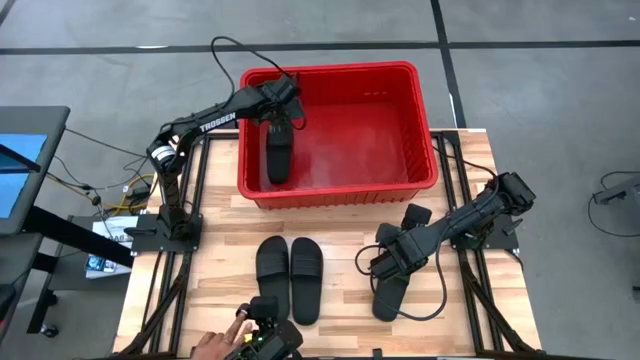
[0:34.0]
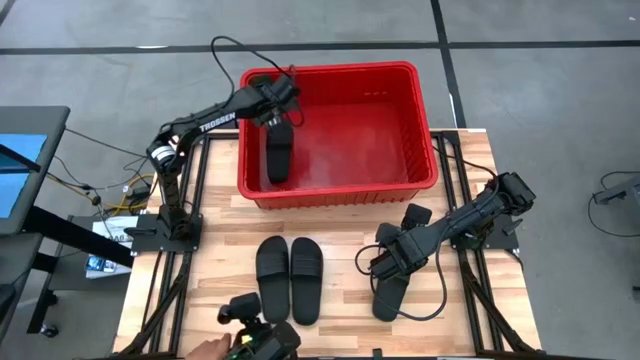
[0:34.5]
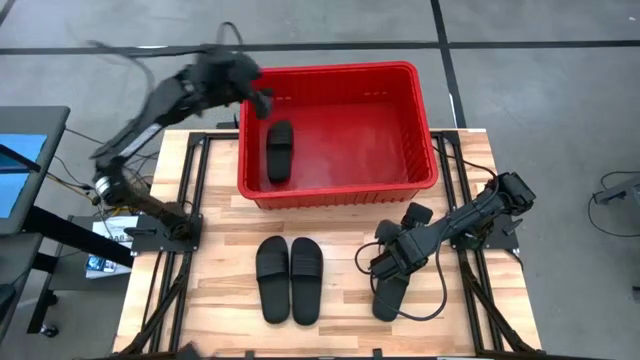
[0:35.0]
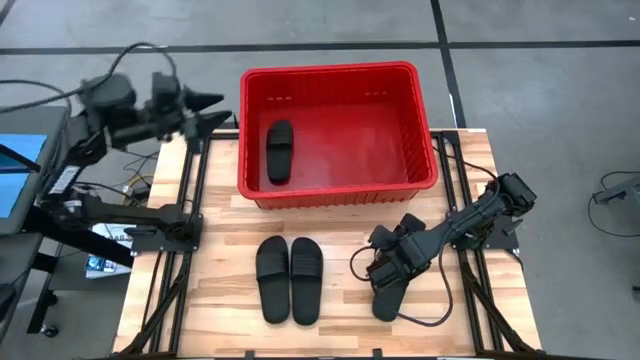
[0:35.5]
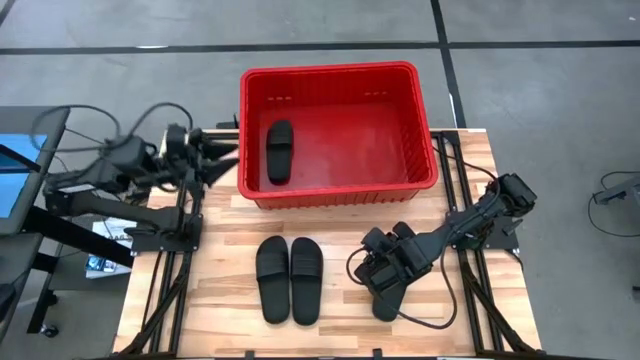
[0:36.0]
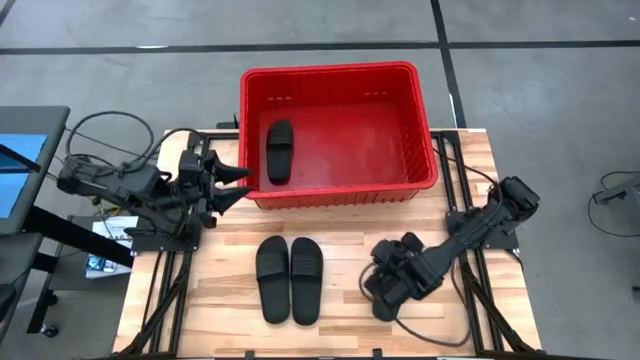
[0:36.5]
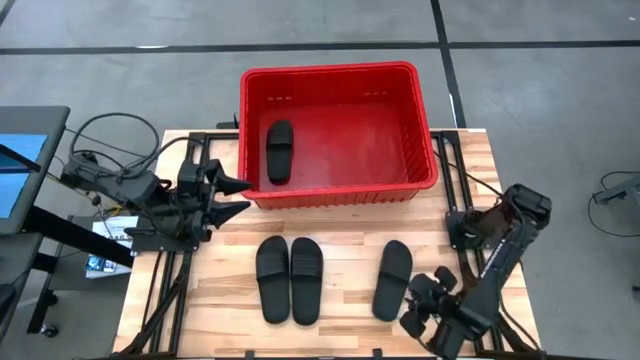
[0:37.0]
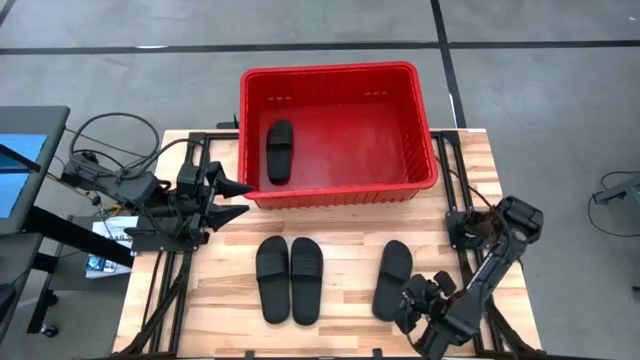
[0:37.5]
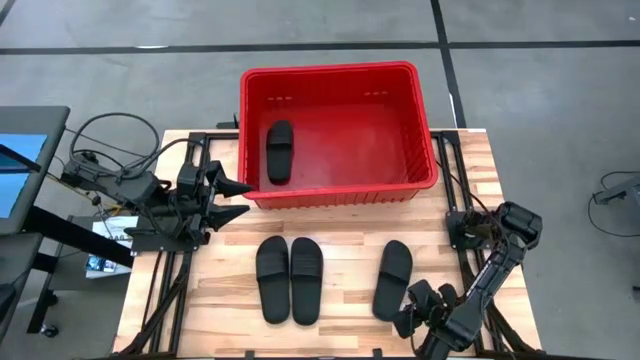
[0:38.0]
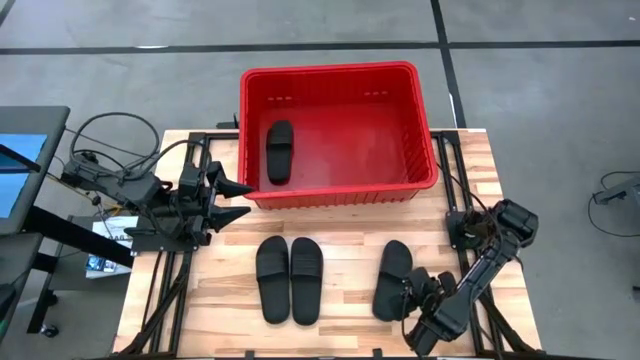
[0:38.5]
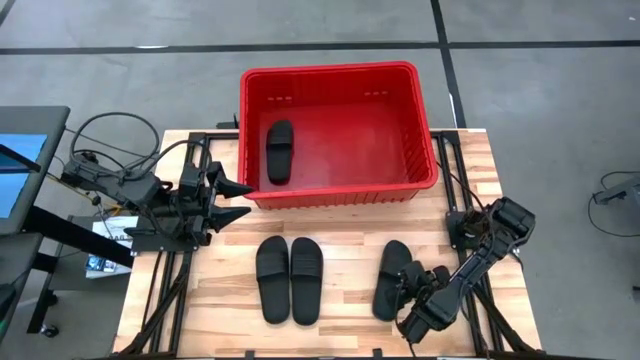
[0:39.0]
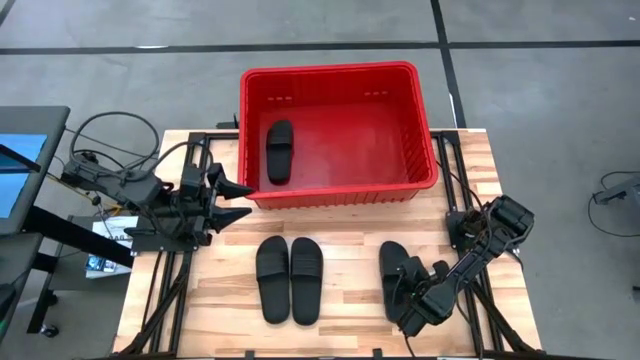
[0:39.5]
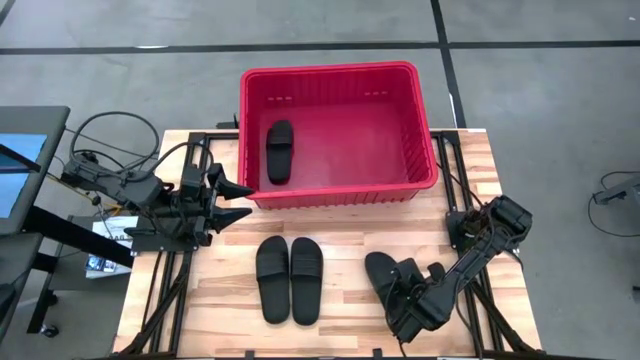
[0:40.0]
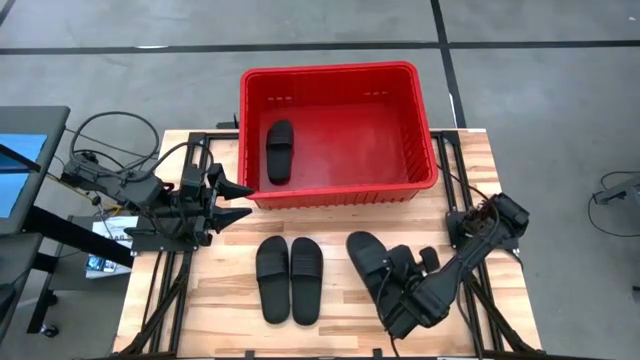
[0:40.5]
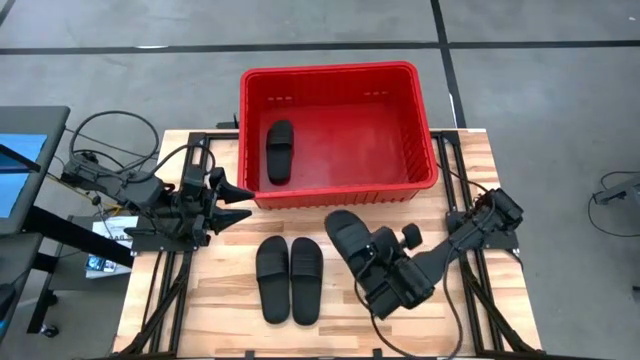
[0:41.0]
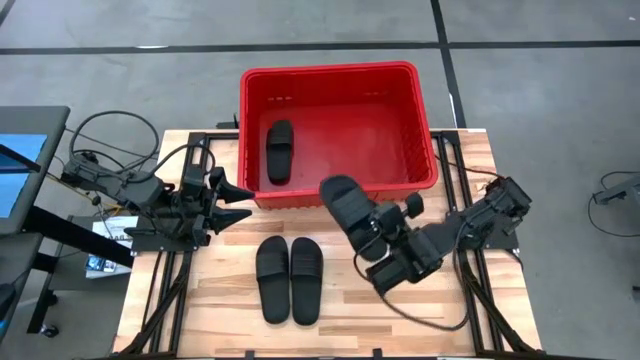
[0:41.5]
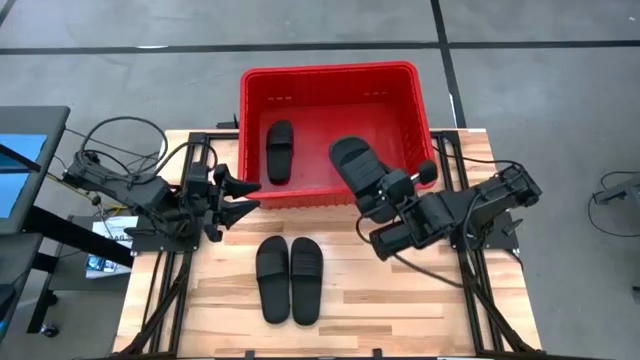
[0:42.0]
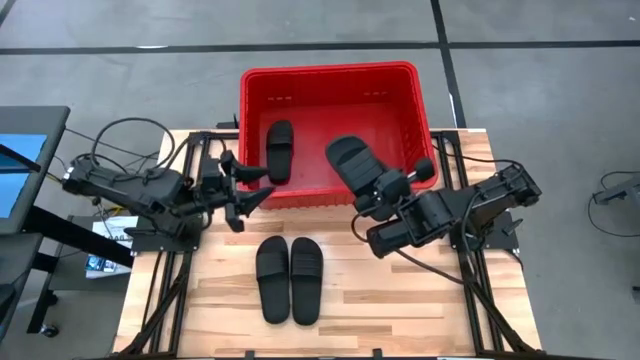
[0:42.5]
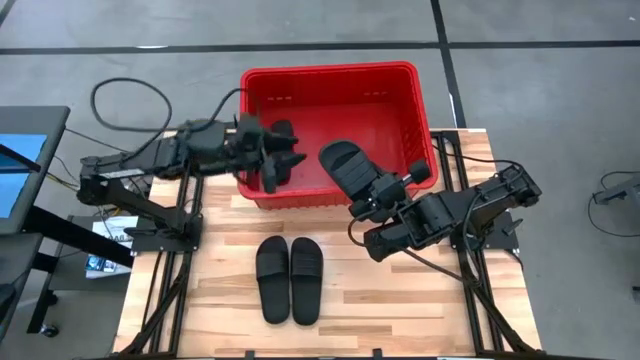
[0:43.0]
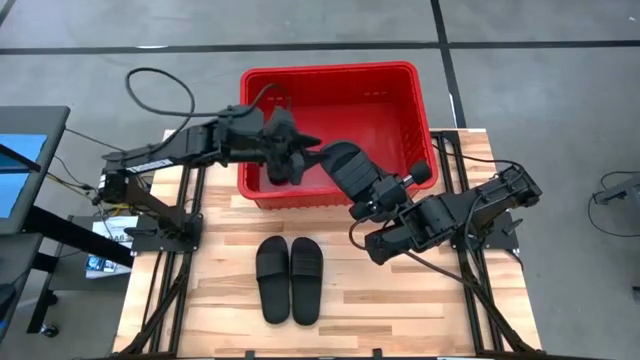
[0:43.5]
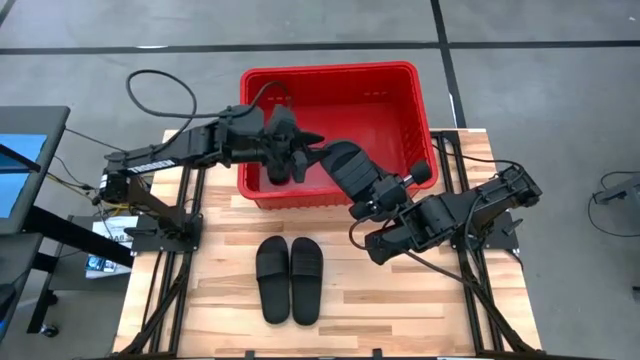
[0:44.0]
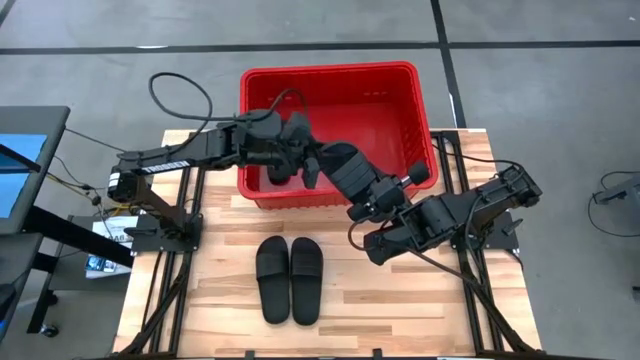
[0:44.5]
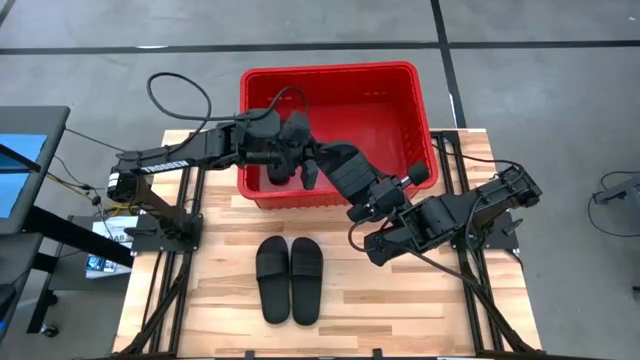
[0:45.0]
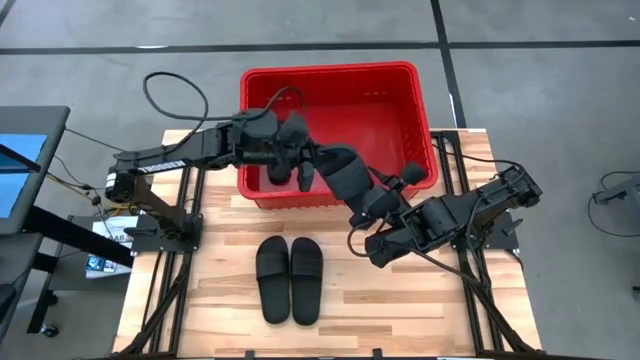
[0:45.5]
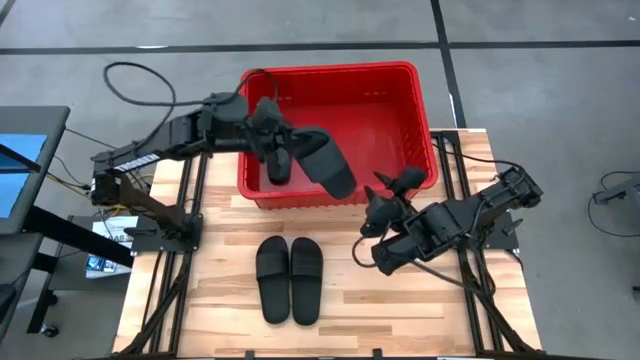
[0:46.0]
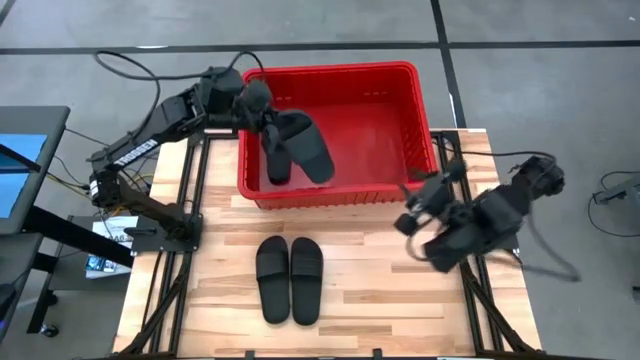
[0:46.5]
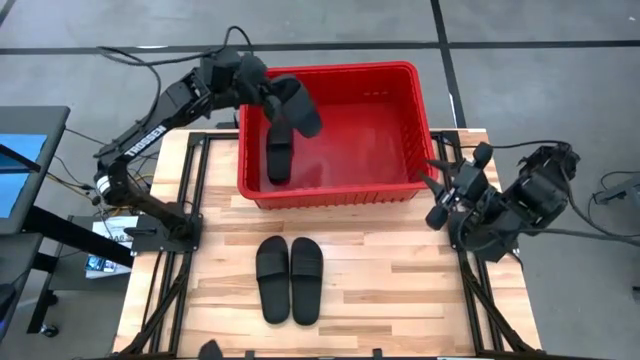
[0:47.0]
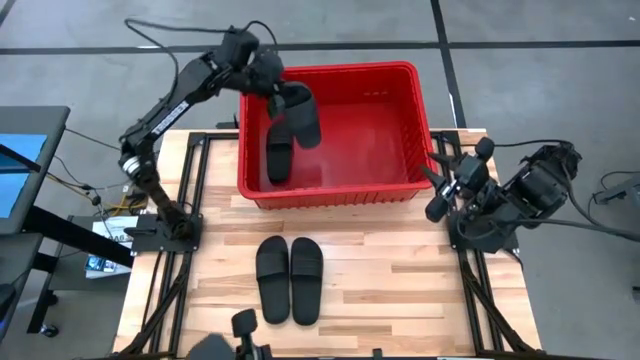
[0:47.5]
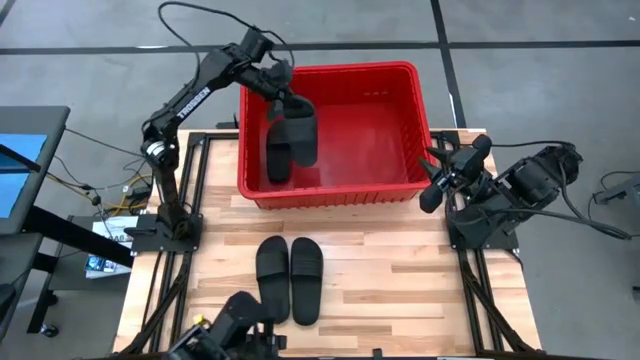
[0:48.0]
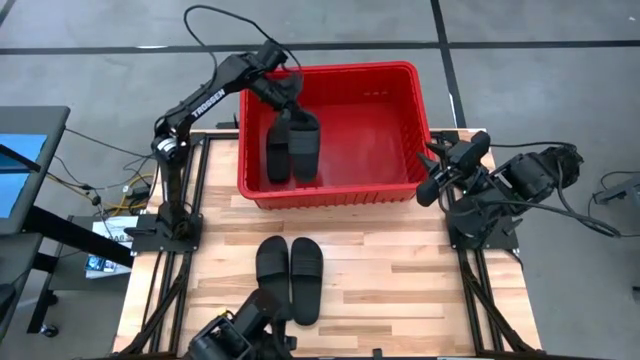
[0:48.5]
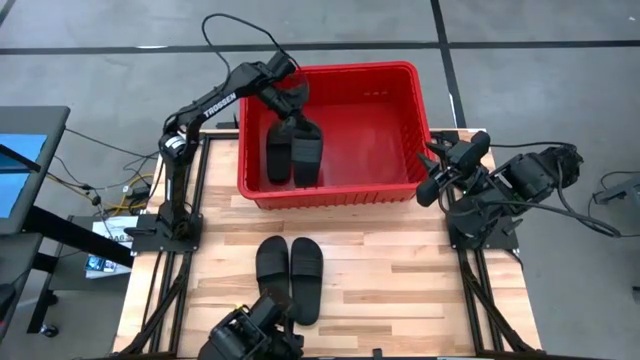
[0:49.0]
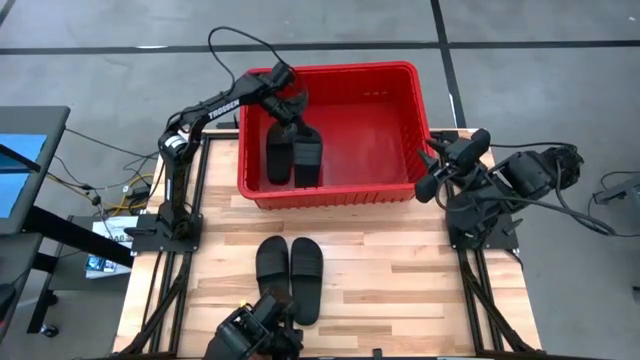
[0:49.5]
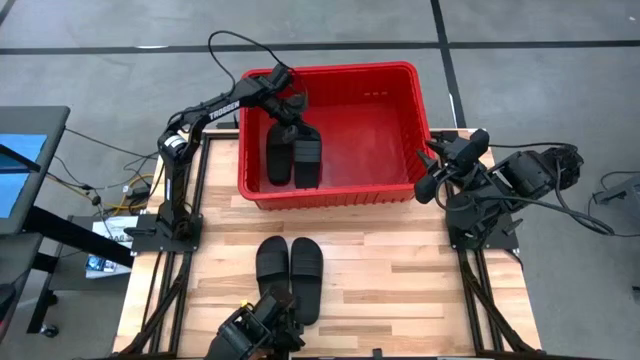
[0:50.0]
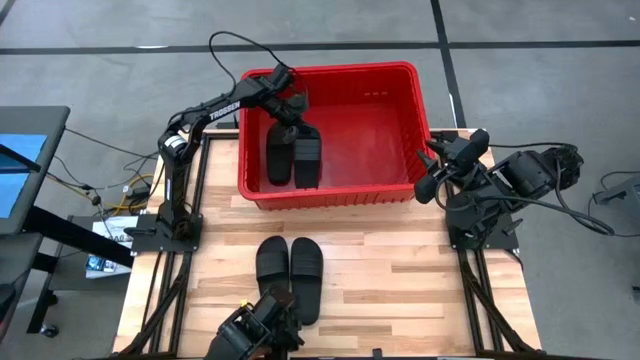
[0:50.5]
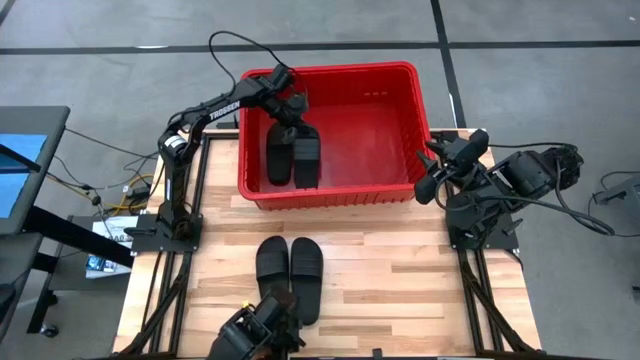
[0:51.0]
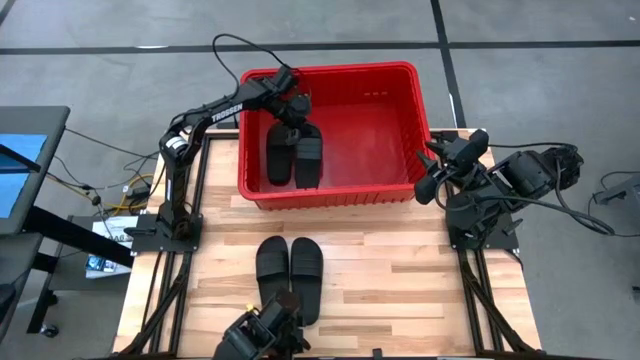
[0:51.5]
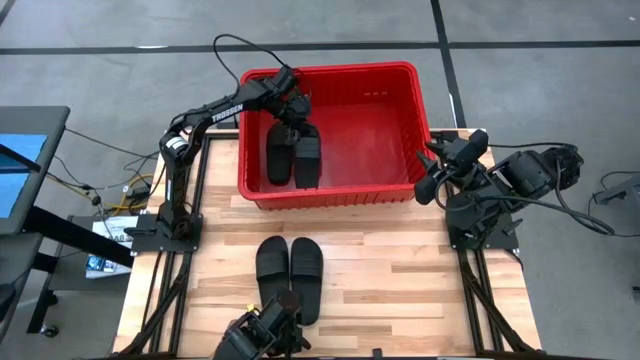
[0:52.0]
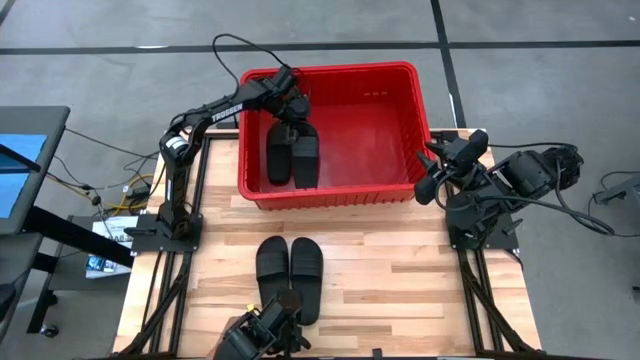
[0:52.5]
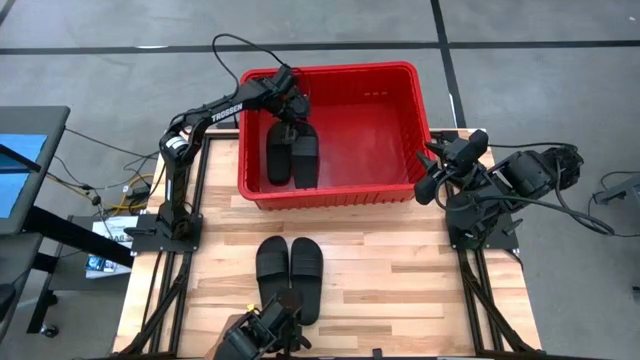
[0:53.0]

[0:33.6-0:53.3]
Task: Pick and place slides into bin
Put the black slide into the red organizer bin
